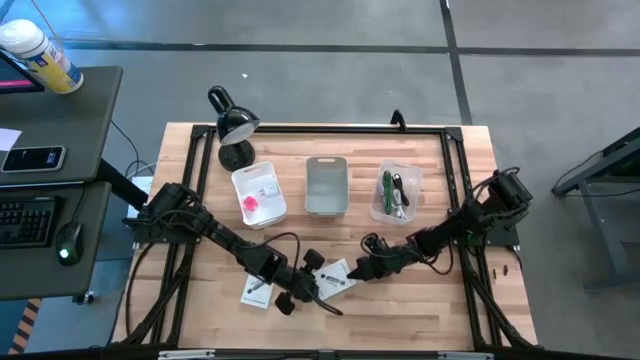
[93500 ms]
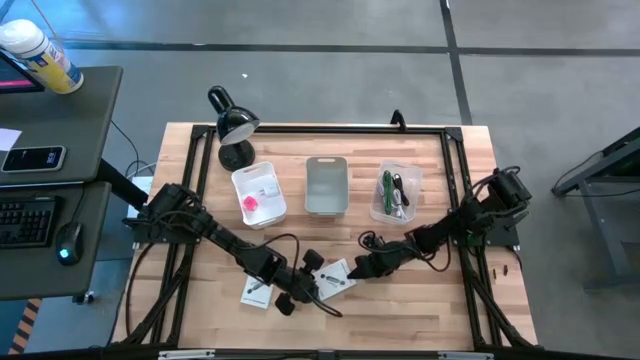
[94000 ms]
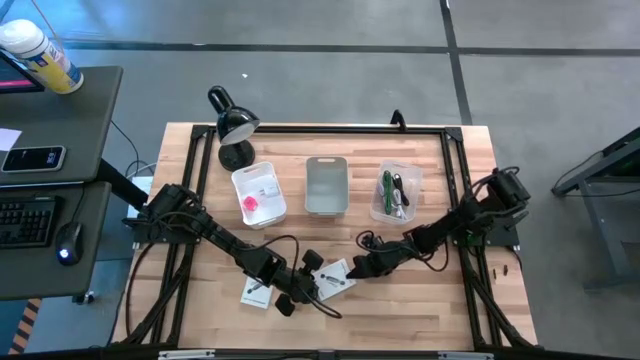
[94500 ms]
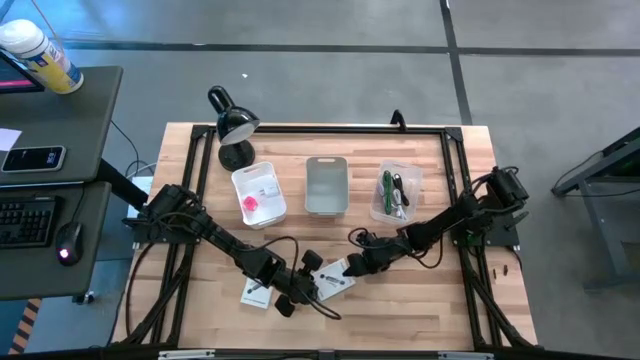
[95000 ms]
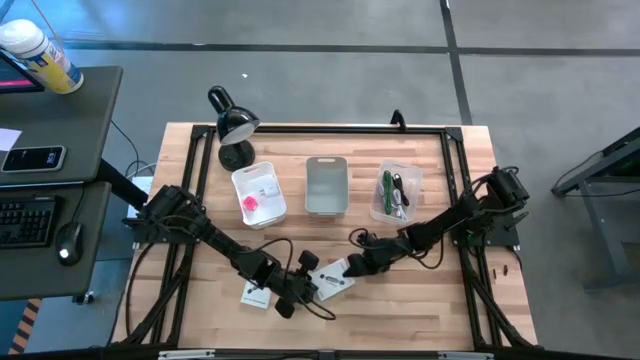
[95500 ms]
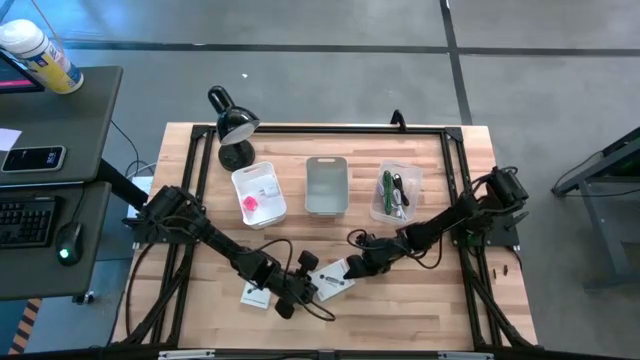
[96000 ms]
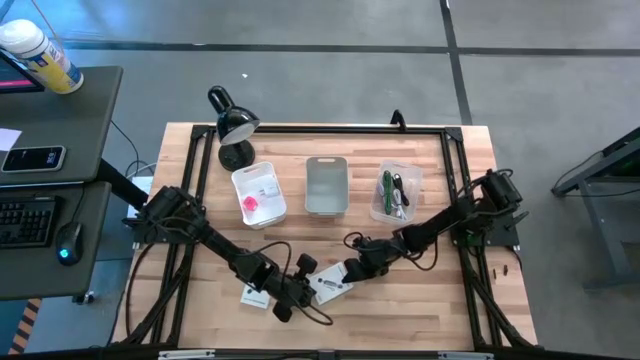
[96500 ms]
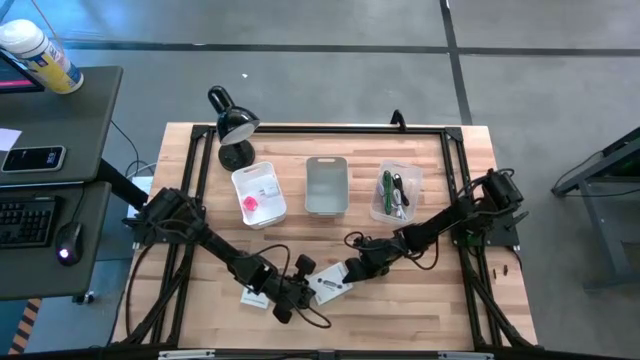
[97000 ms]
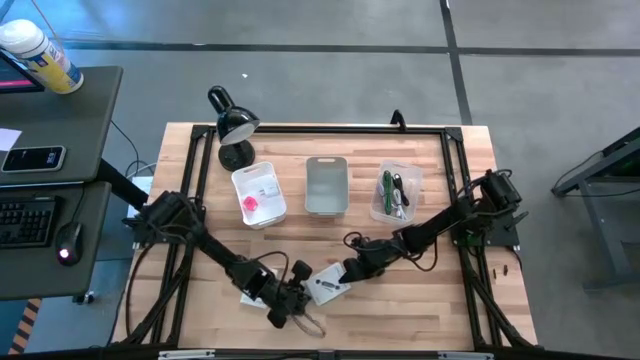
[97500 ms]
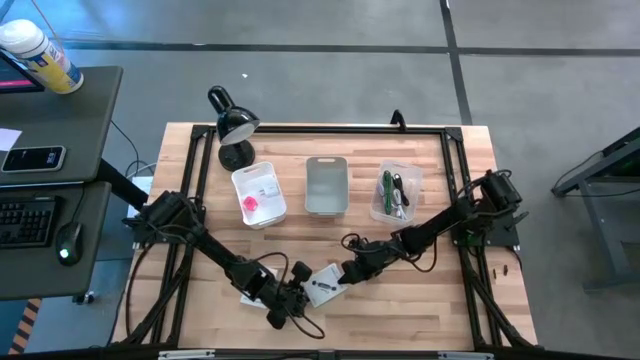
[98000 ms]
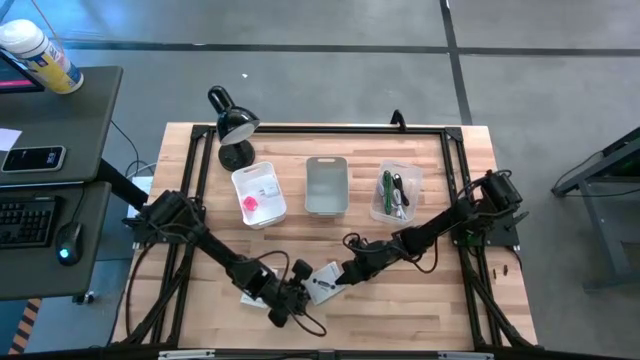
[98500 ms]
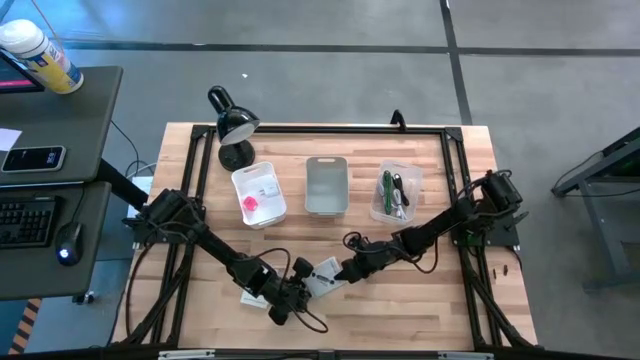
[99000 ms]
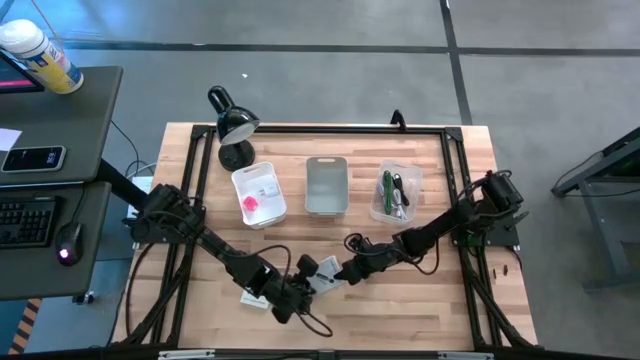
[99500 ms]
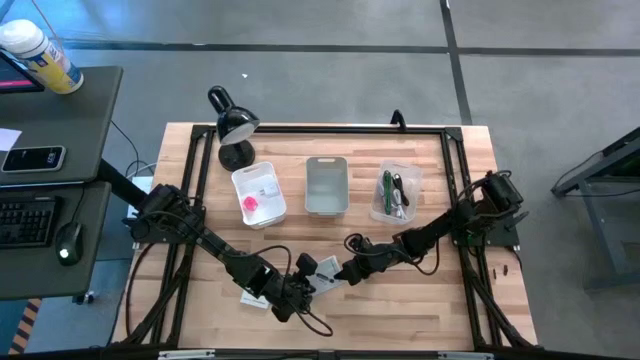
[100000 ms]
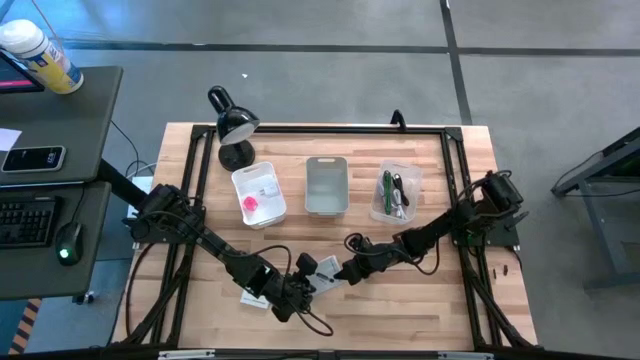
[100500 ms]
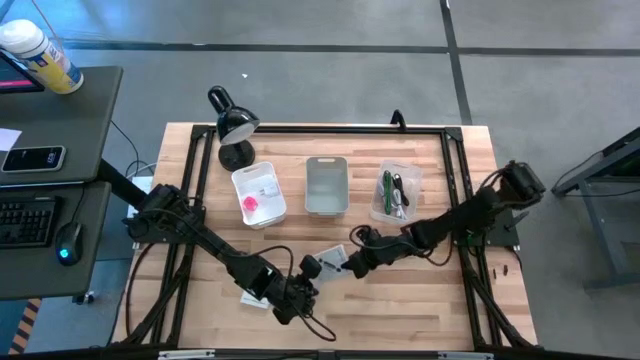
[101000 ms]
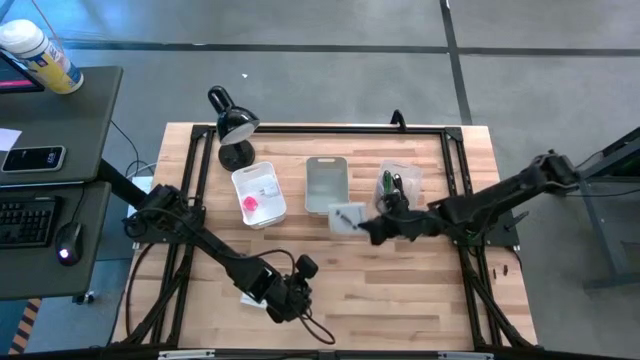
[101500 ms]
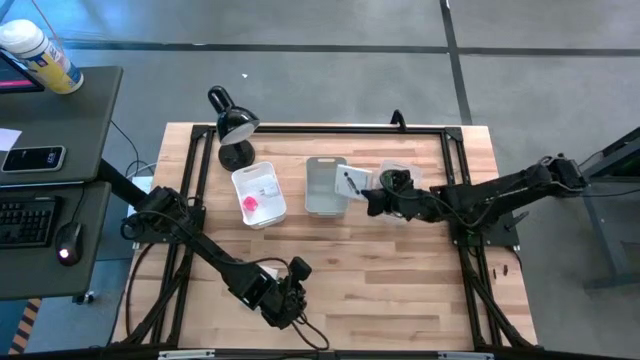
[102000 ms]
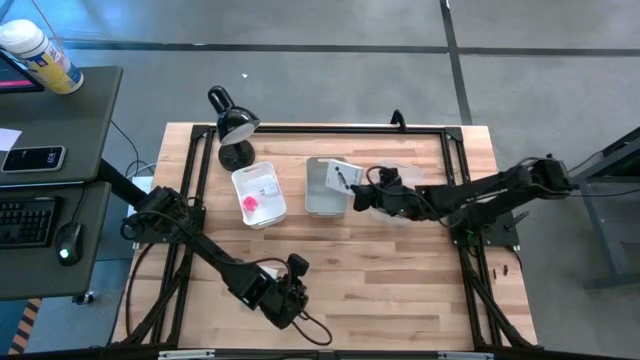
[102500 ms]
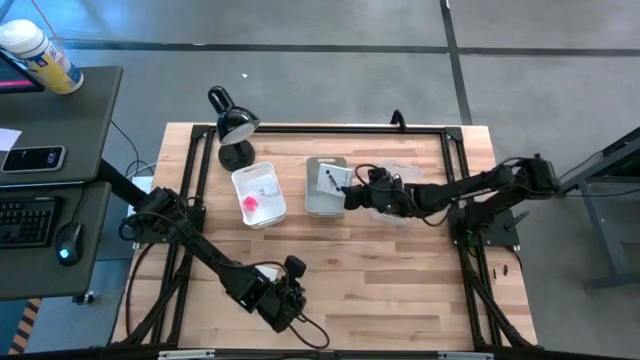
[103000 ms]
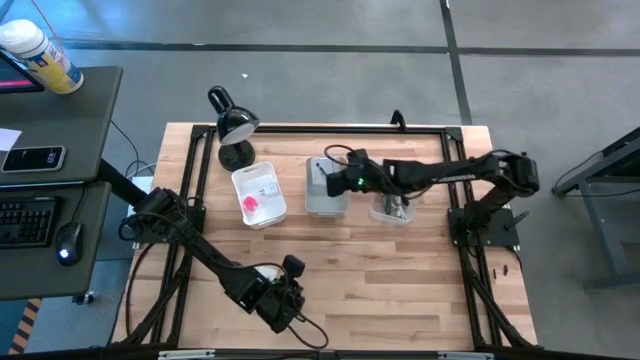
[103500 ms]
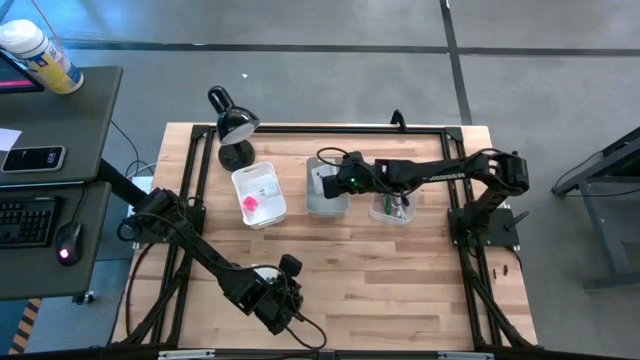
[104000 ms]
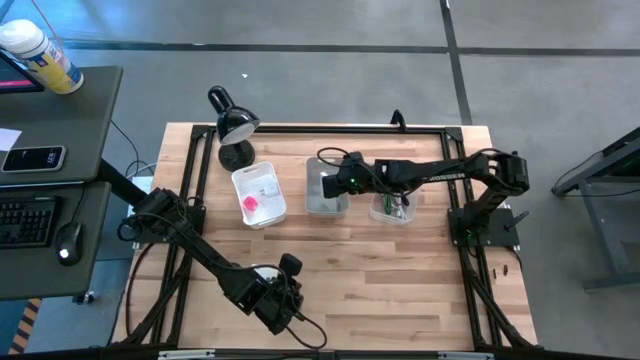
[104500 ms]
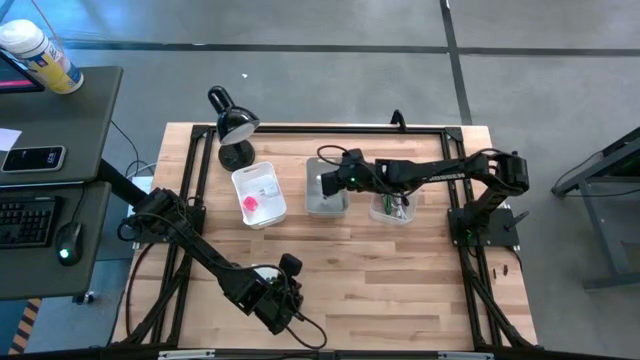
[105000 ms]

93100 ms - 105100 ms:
Task: Pick and place items into bin
Put the right white card reader box into the gray bin

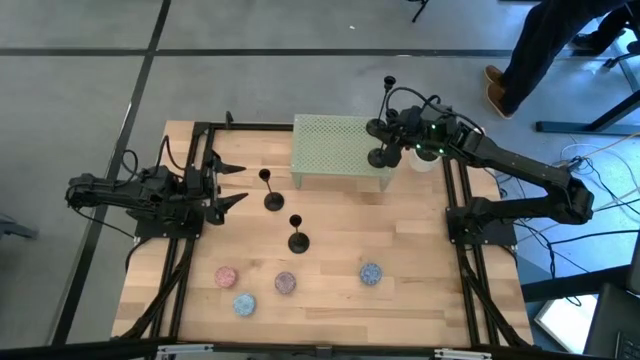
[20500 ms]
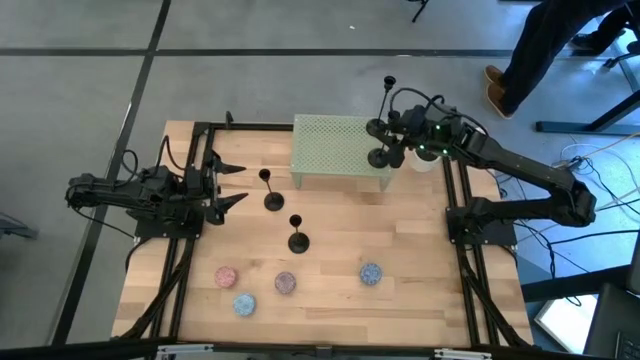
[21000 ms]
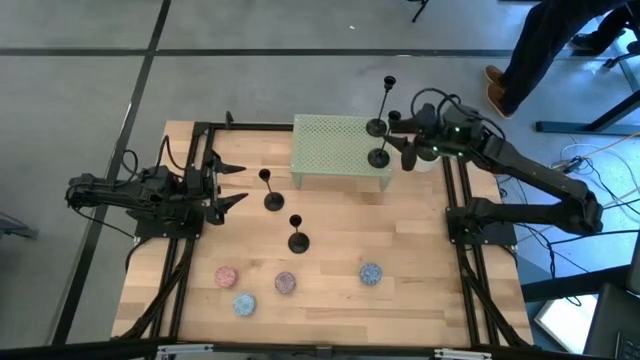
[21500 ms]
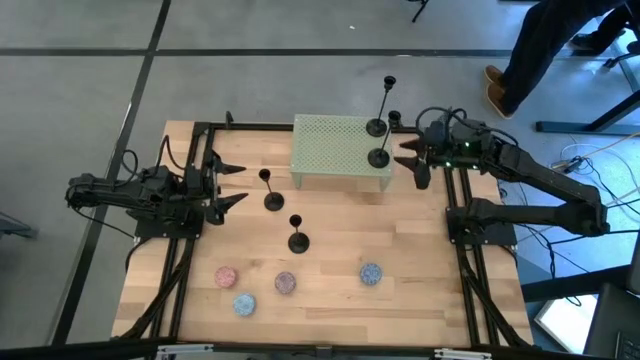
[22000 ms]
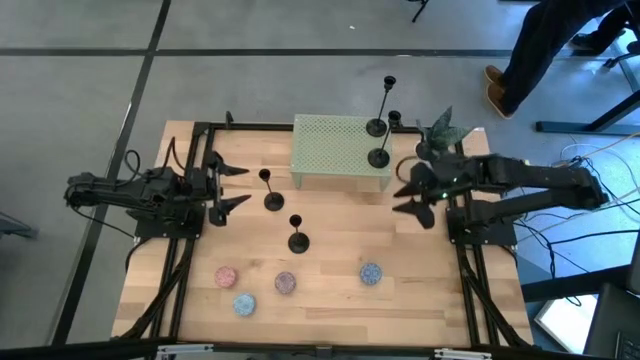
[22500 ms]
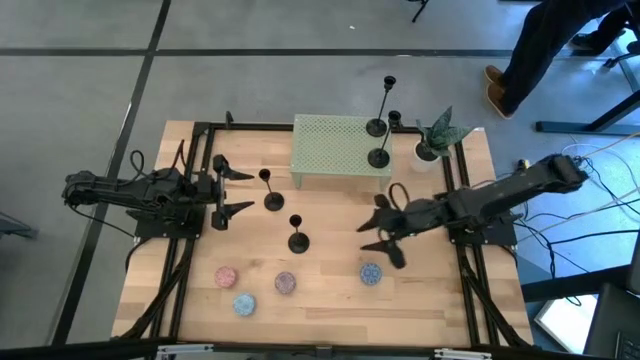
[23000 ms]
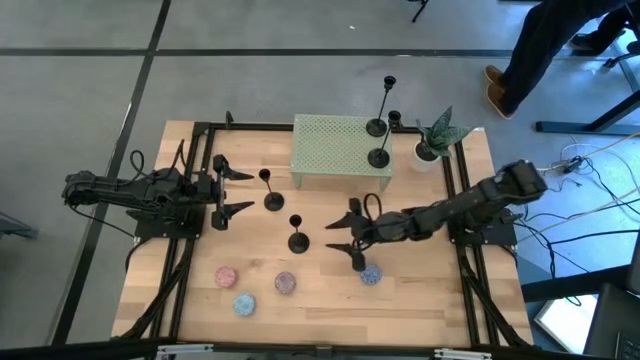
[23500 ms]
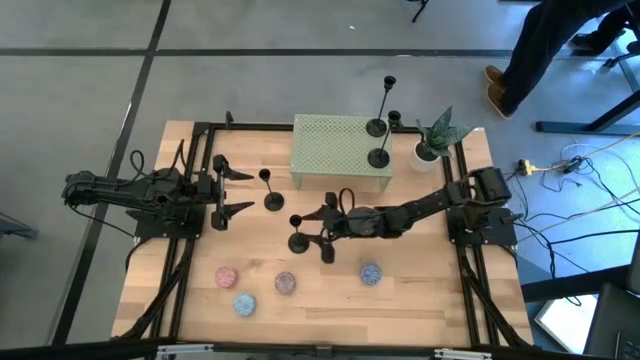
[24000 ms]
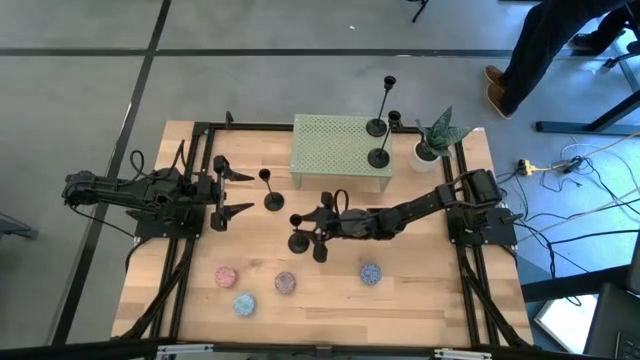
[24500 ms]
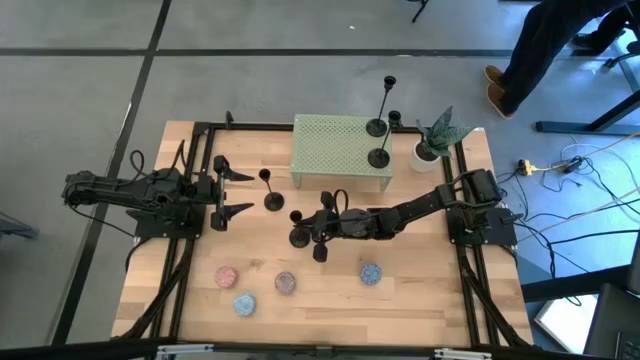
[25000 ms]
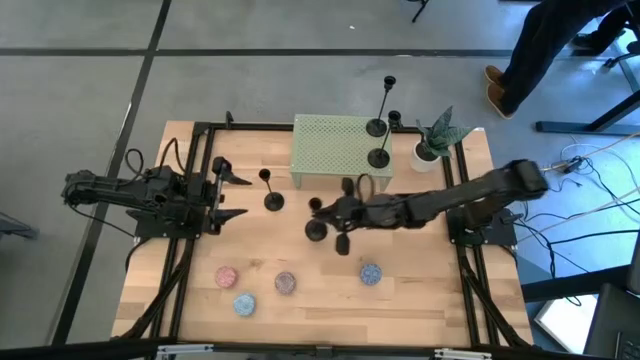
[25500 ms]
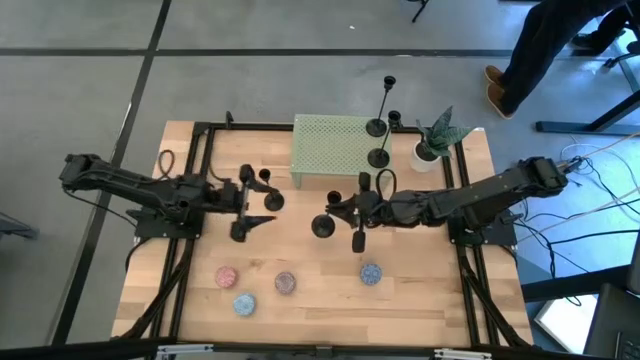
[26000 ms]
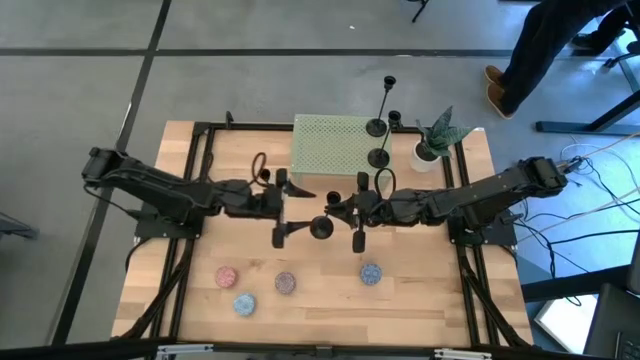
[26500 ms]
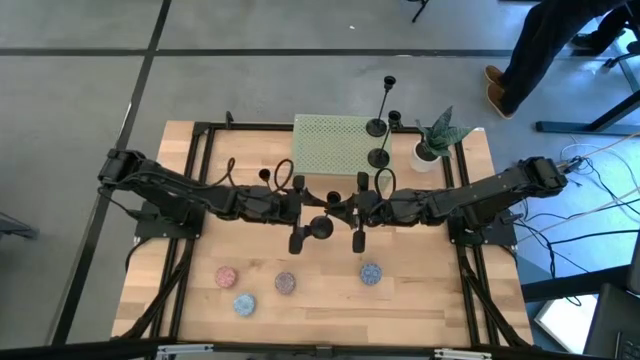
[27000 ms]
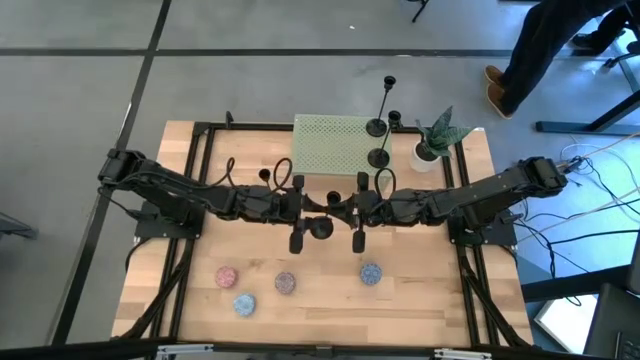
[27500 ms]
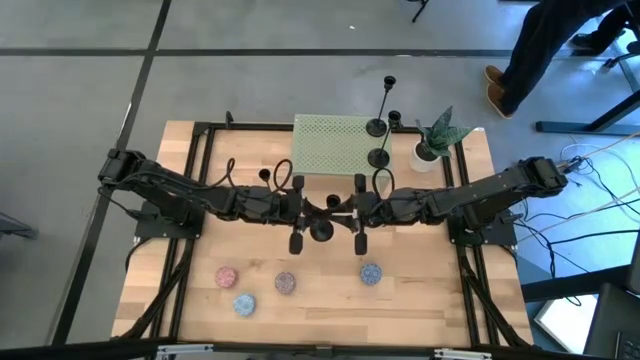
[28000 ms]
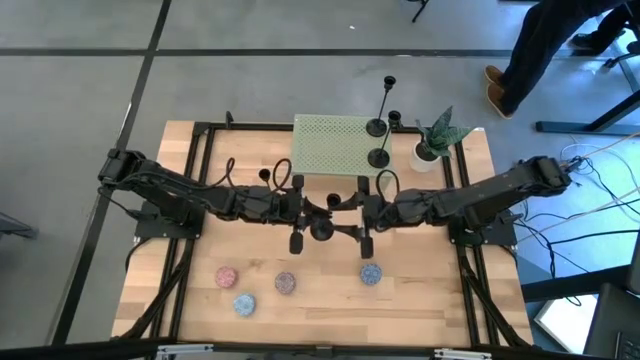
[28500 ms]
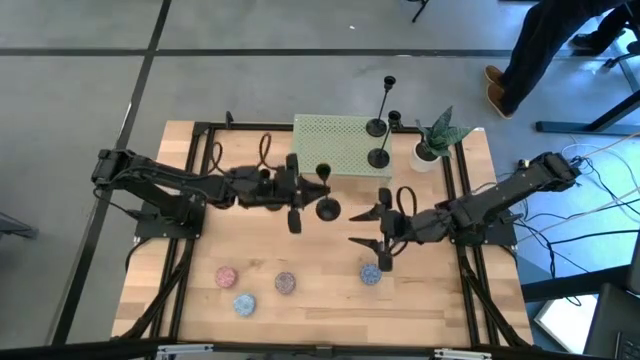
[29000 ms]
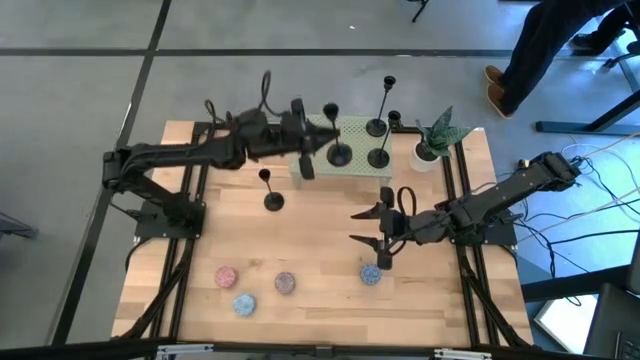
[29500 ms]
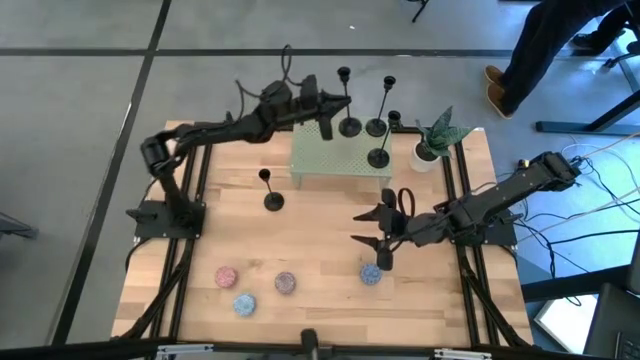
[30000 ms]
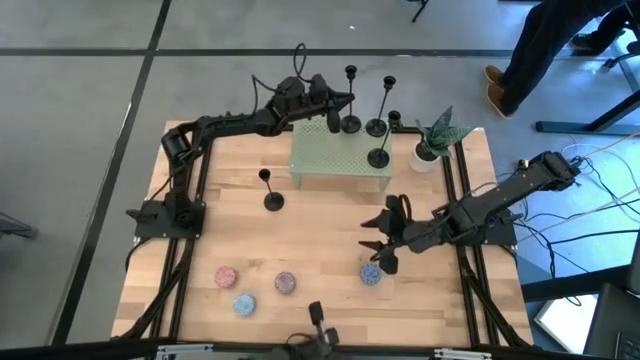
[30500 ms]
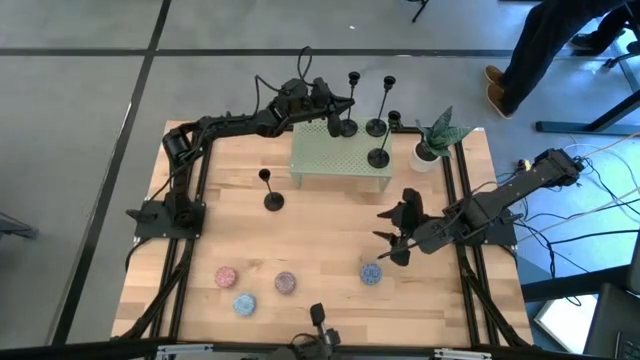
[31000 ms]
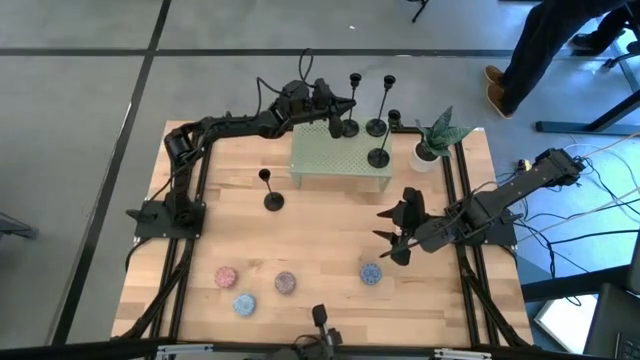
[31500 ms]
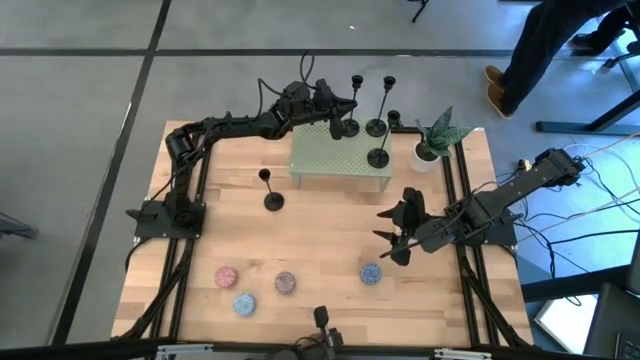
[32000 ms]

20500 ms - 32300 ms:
Task: Pick & Place candle stick holders
Put the black candle holder on the shelf
